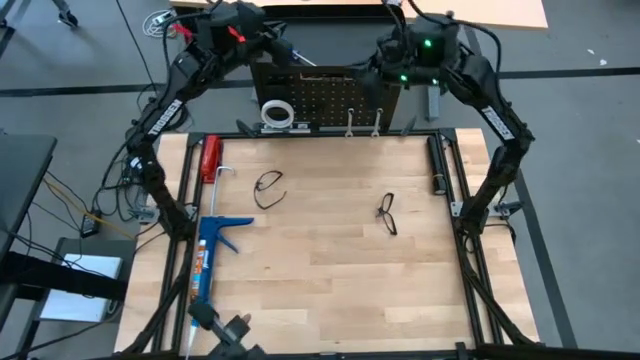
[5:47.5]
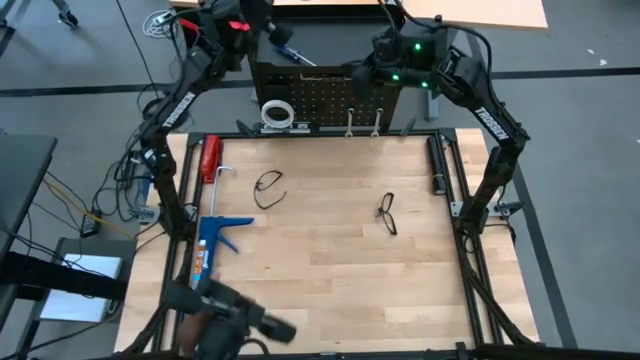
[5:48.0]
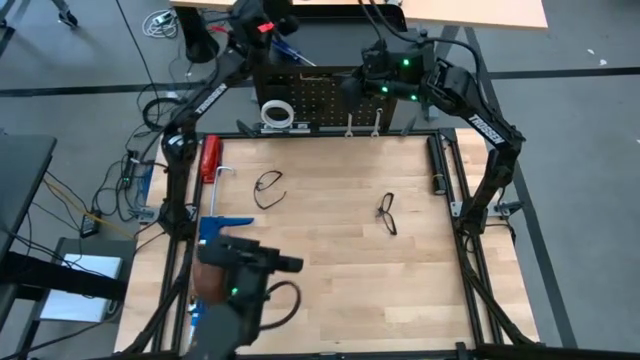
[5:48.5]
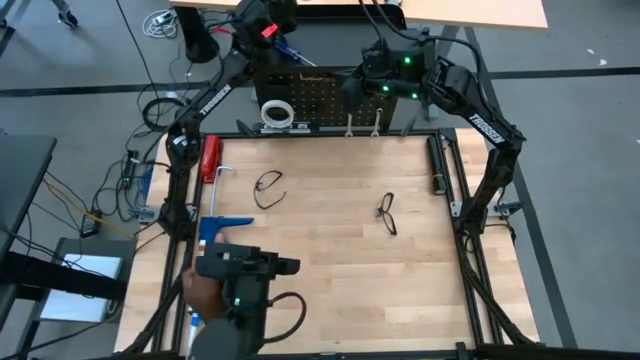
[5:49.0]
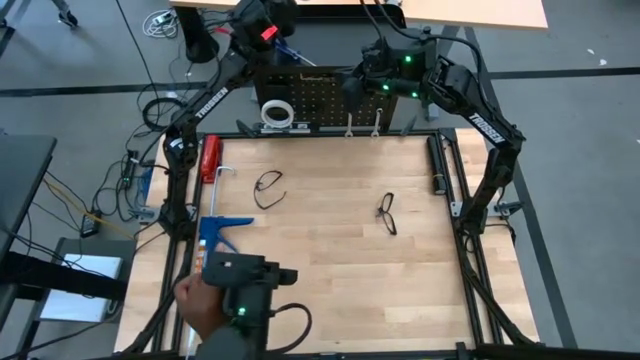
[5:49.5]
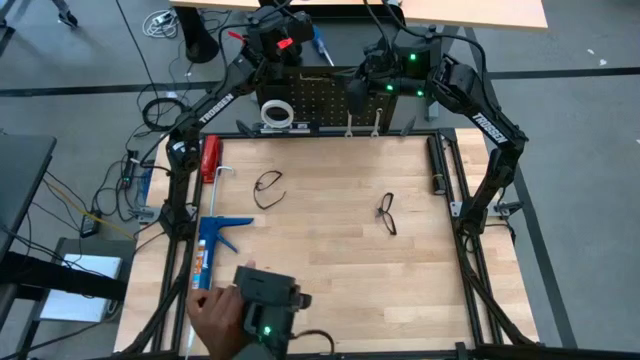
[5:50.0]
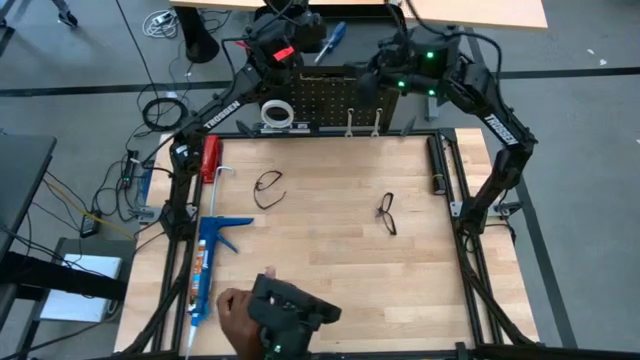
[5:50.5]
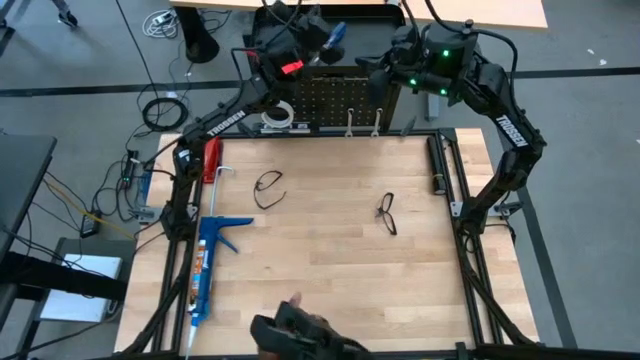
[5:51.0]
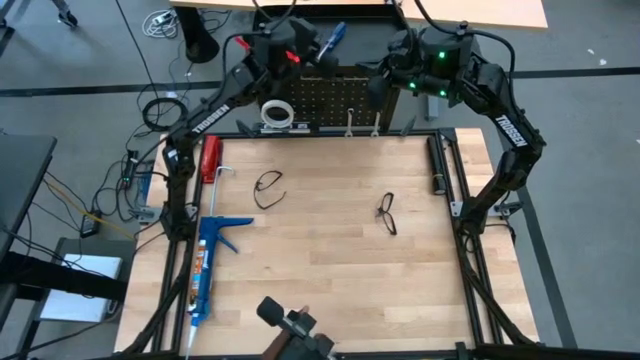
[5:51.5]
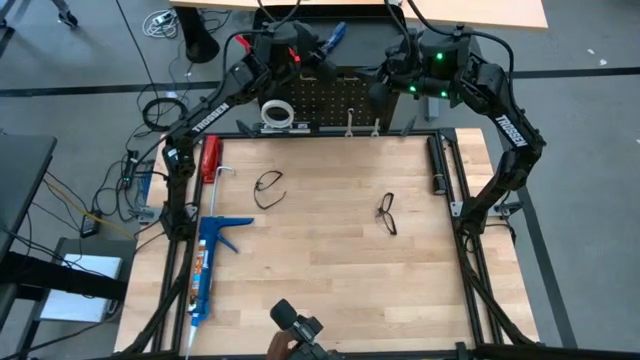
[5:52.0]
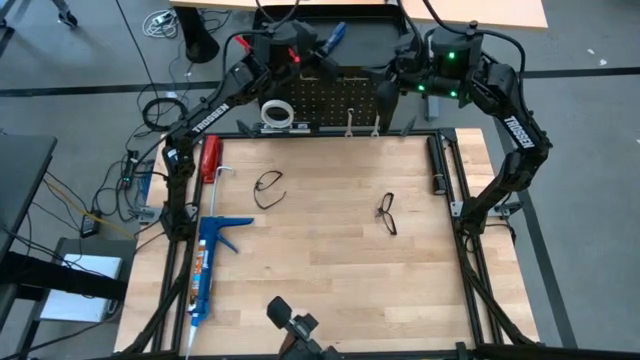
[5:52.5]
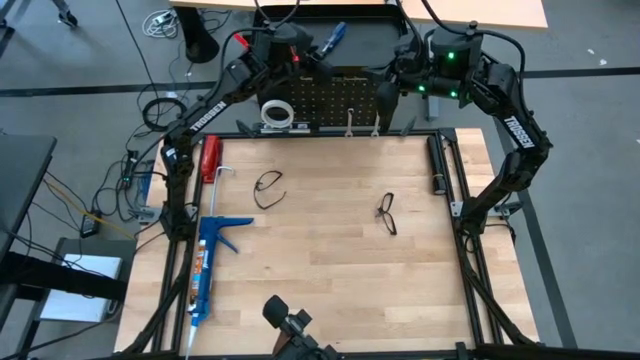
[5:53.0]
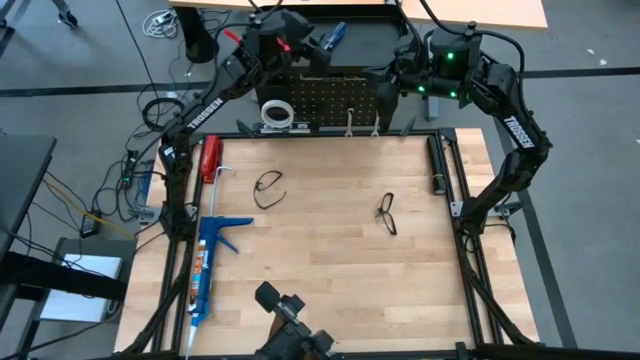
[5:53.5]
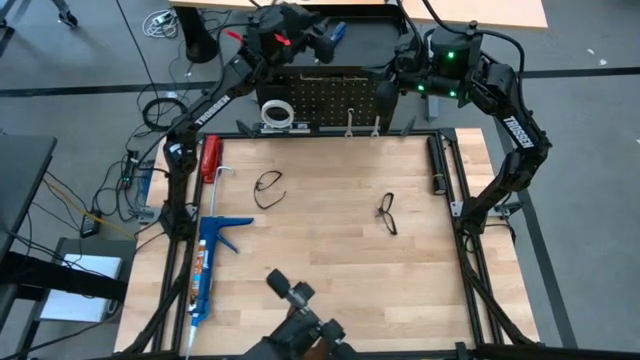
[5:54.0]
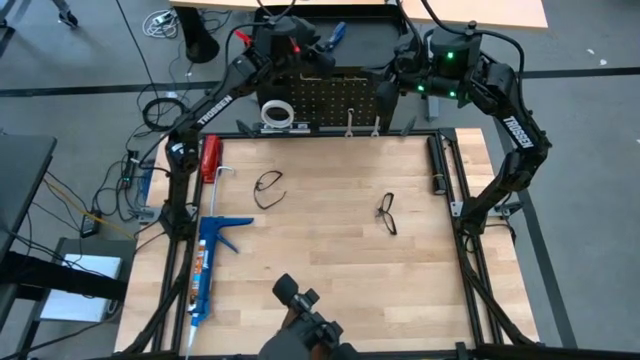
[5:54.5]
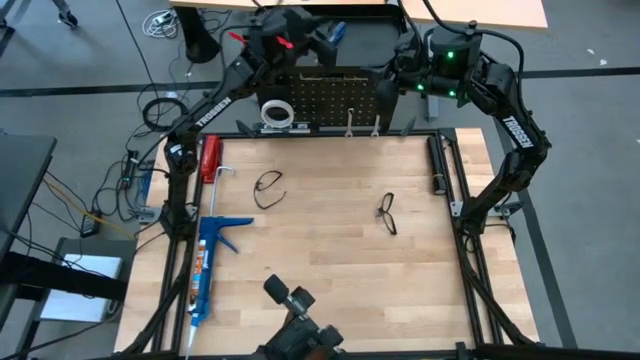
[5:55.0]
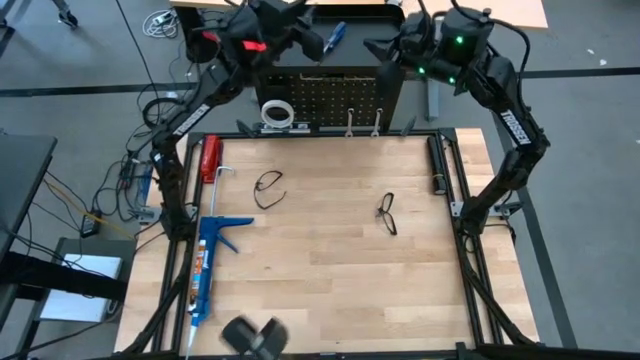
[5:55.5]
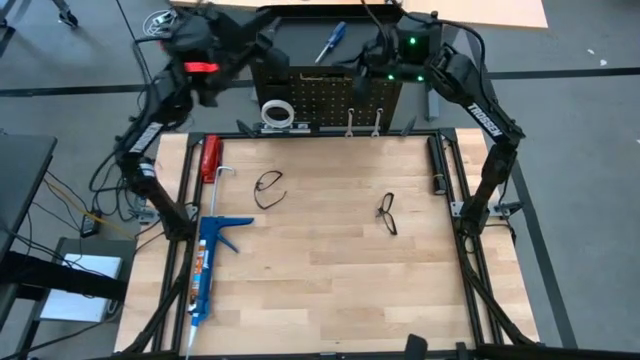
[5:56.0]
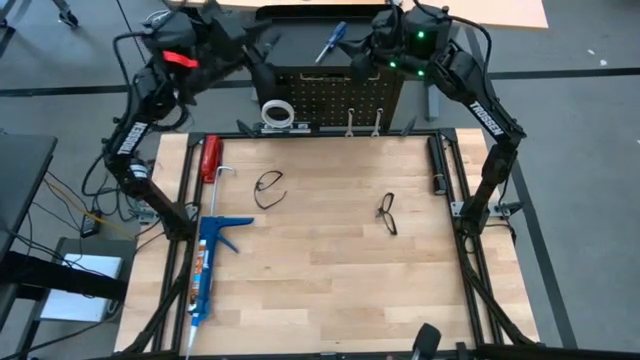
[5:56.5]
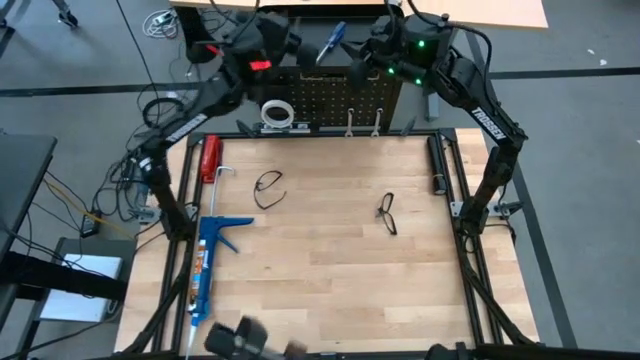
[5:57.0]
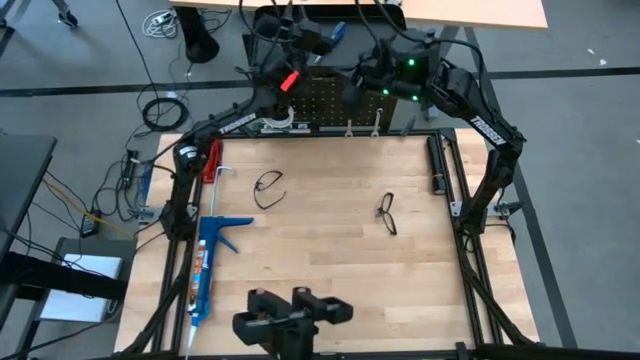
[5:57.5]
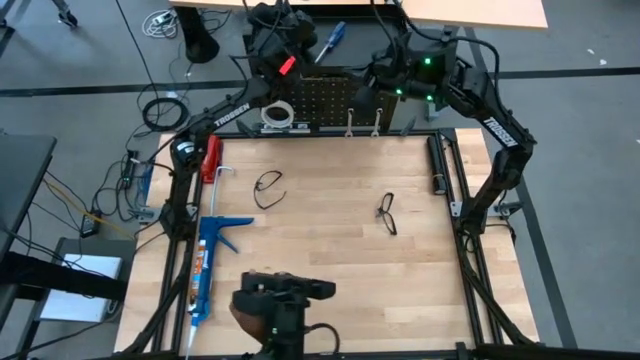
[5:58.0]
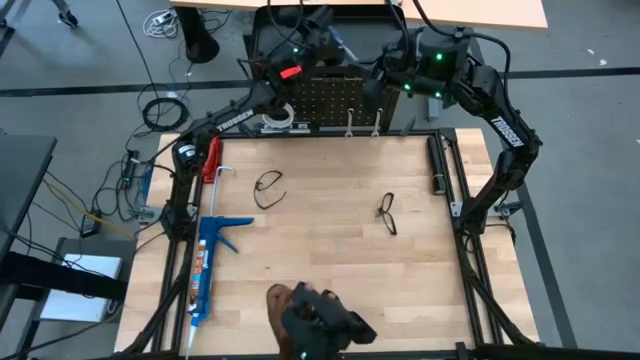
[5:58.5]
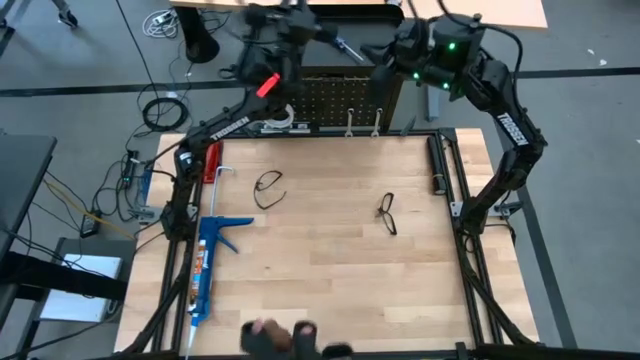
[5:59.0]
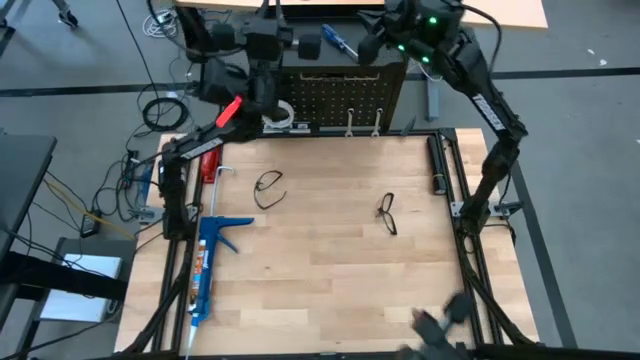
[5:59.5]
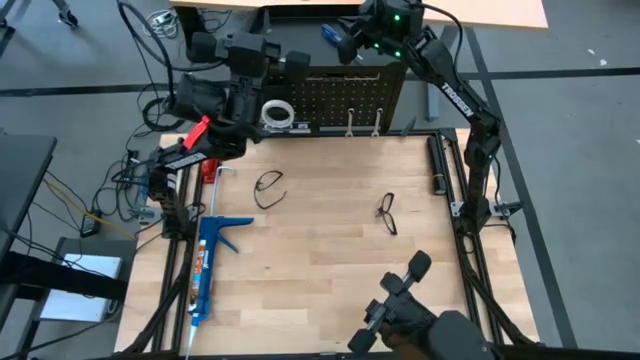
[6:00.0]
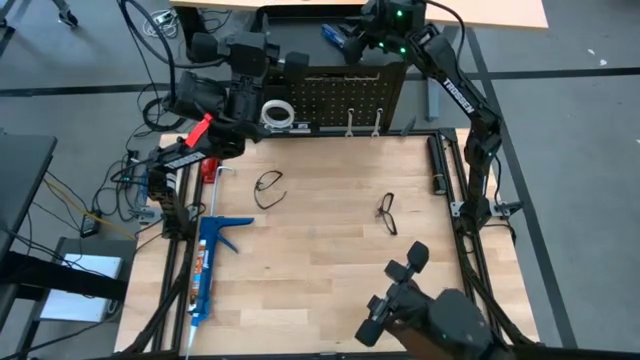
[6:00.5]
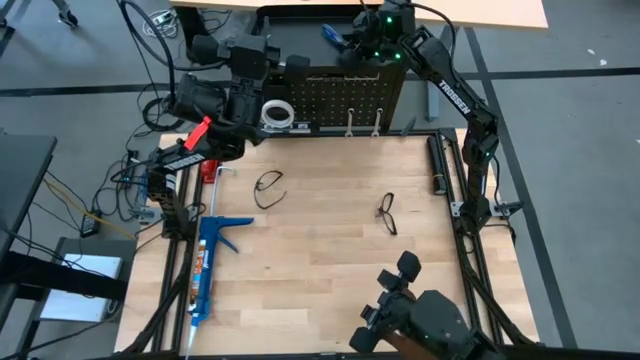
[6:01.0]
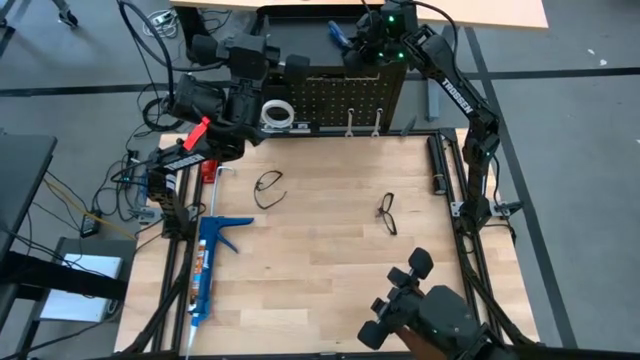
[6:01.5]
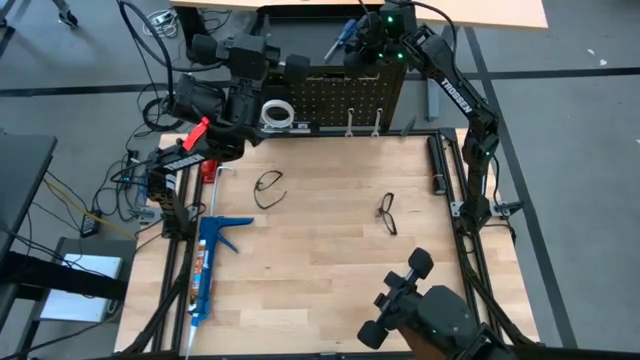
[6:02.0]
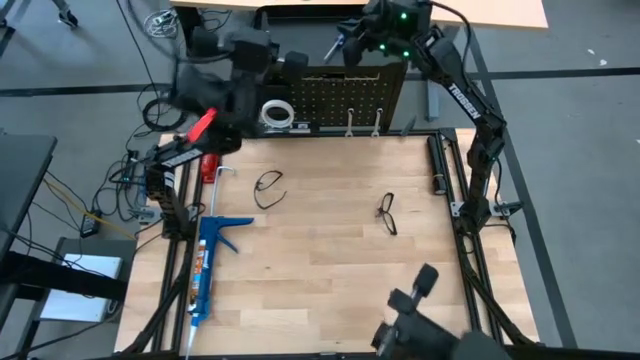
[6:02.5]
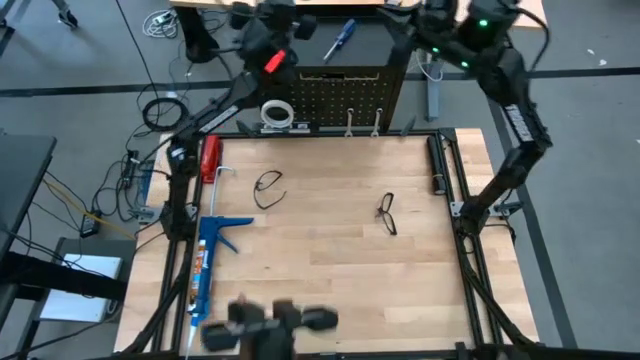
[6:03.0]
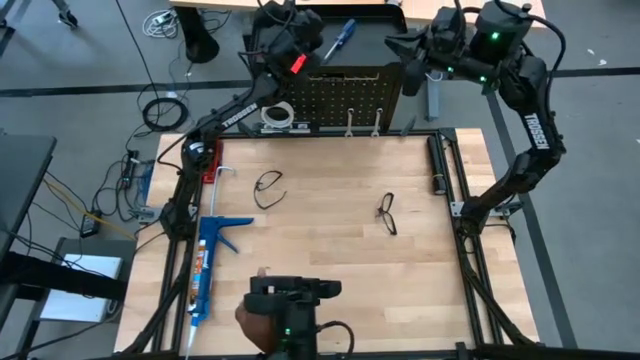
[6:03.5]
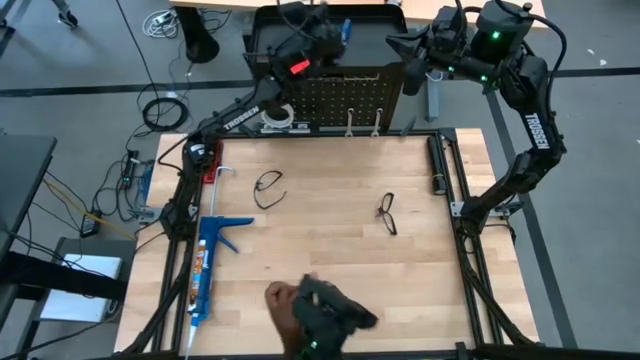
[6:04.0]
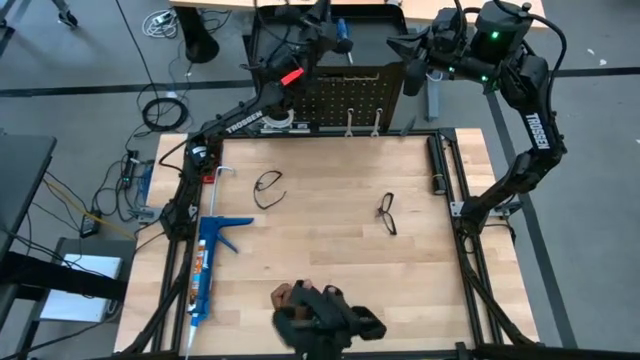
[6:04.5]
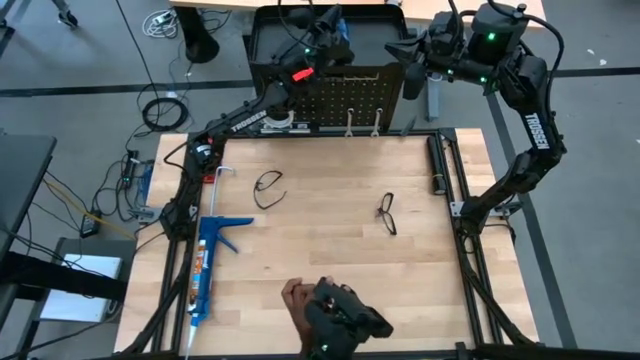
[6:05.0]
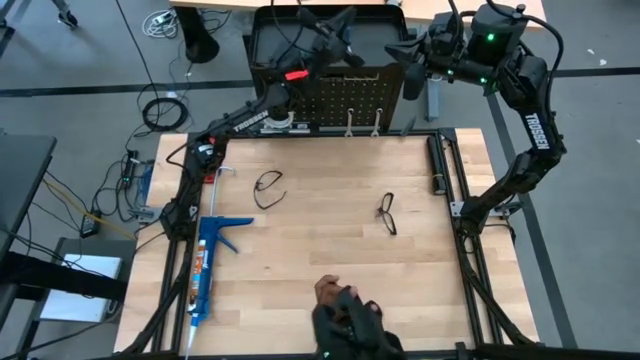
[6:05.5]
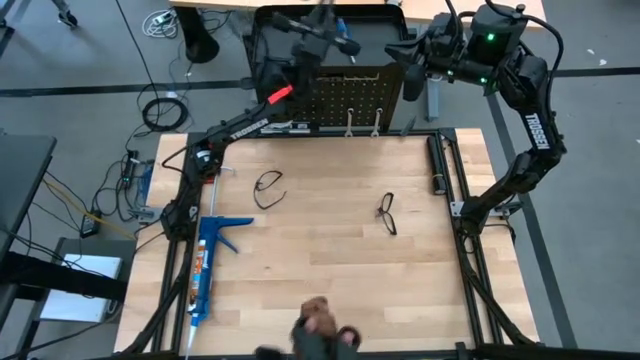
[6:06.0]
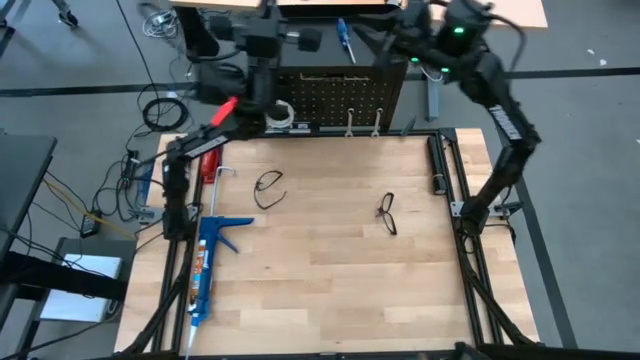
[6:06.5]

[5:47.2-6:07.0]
Task: Hang tools onto peg board
Remove the blue screwdriver from the black pegboard

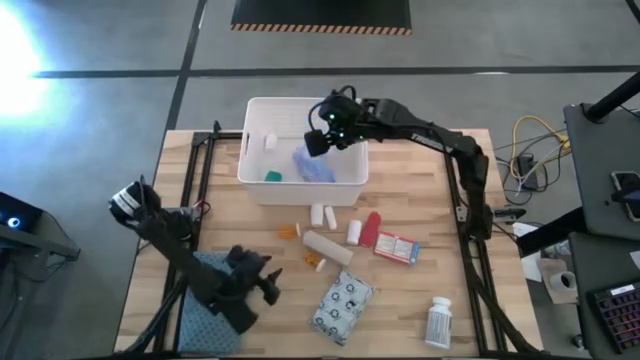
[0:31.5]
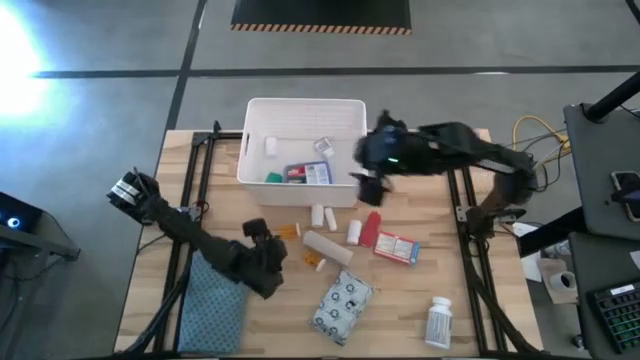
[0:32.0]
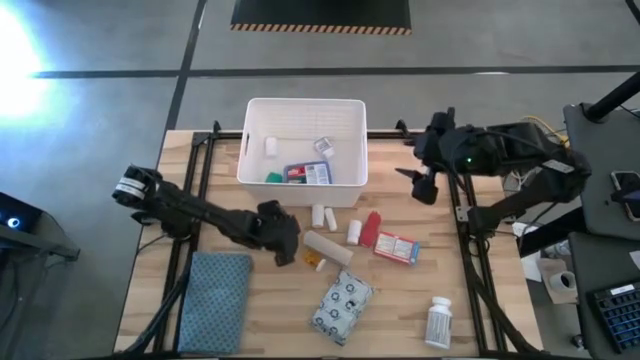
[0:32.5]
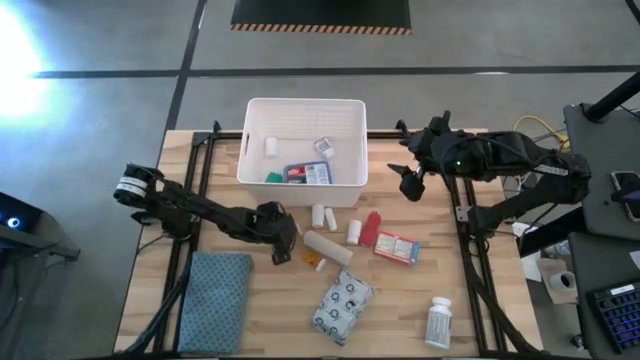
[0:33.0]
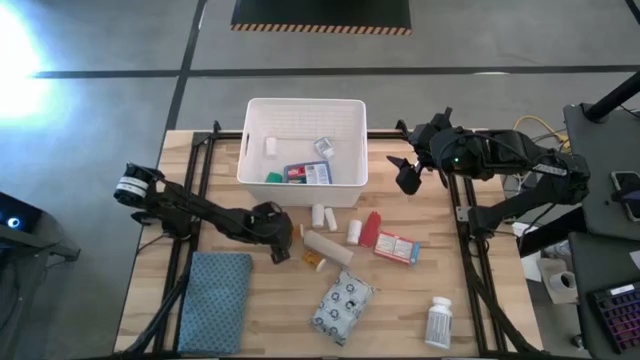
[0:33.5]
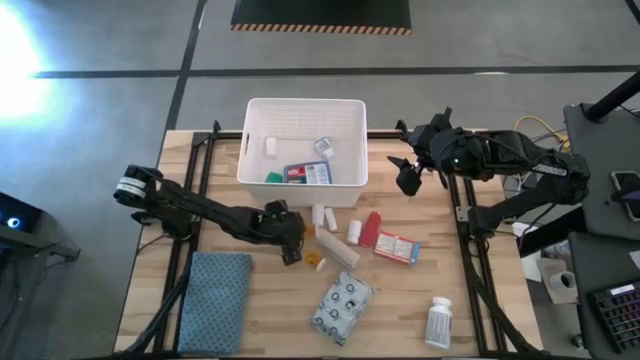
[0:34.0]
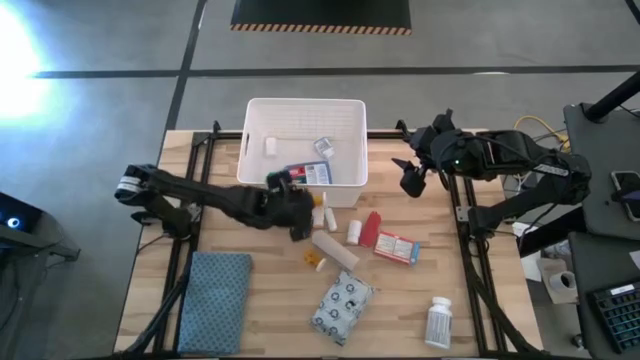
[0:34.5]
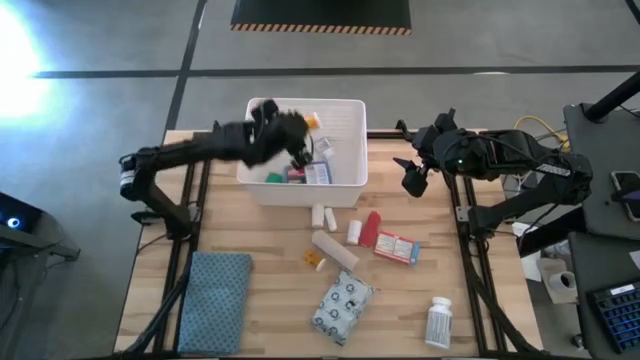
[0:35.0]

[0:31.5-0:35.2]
Task: Pick & place medical supplies in basket/bin
Put the left orange pill bottle into the white bin
